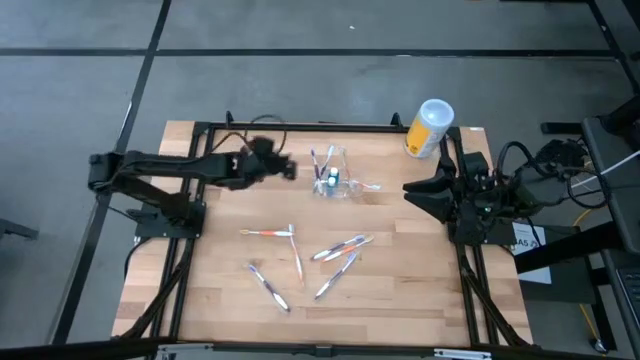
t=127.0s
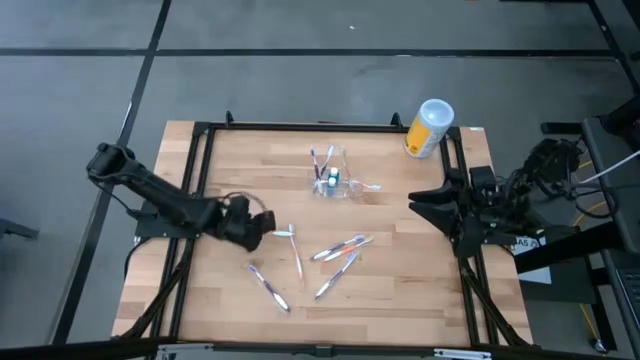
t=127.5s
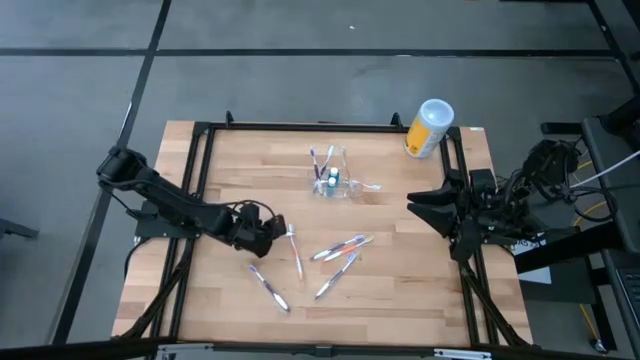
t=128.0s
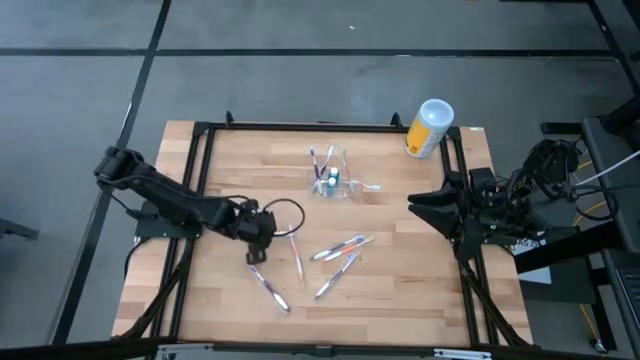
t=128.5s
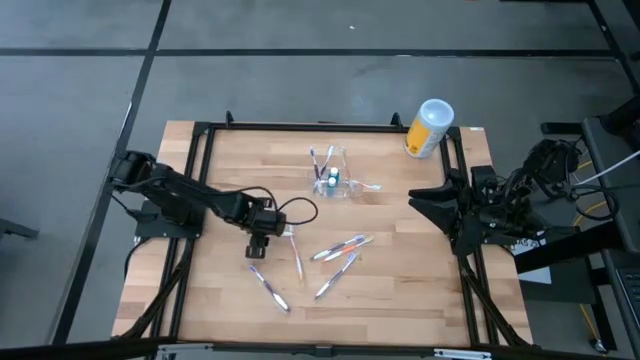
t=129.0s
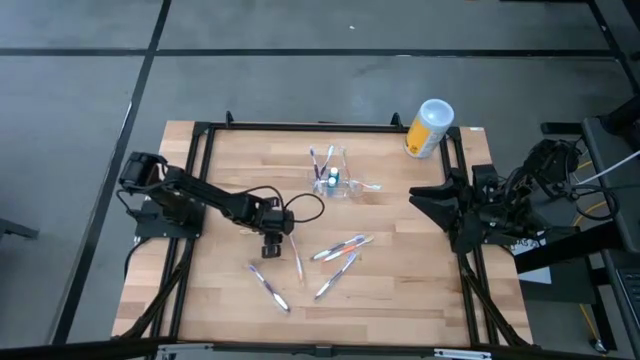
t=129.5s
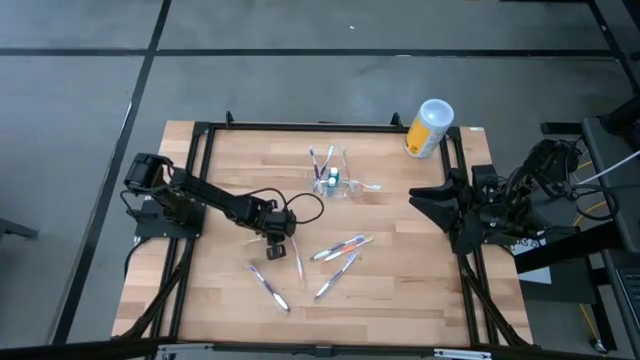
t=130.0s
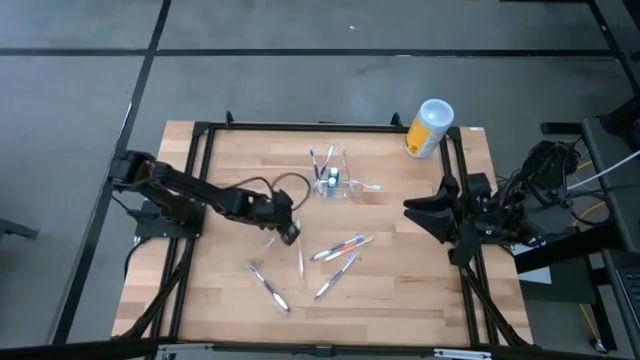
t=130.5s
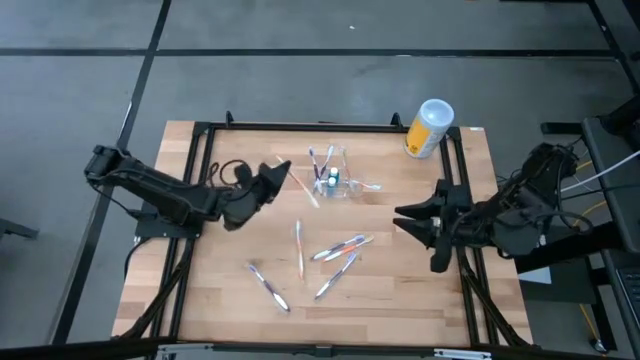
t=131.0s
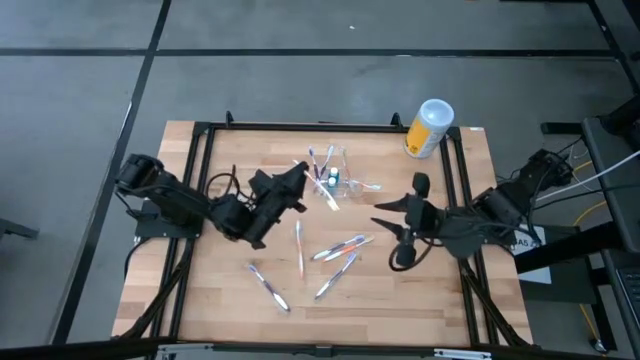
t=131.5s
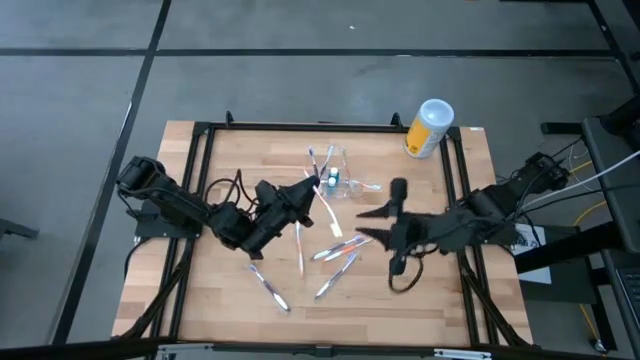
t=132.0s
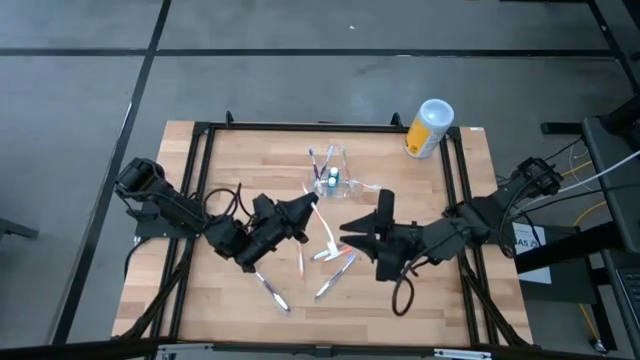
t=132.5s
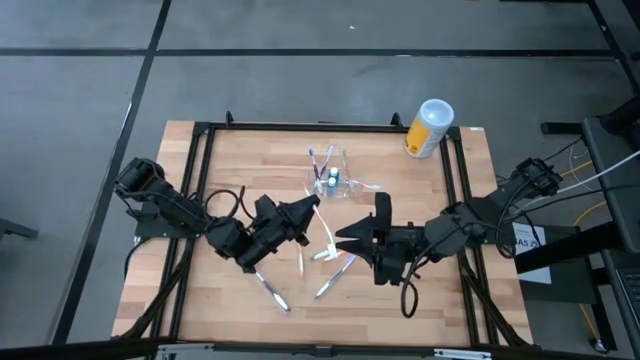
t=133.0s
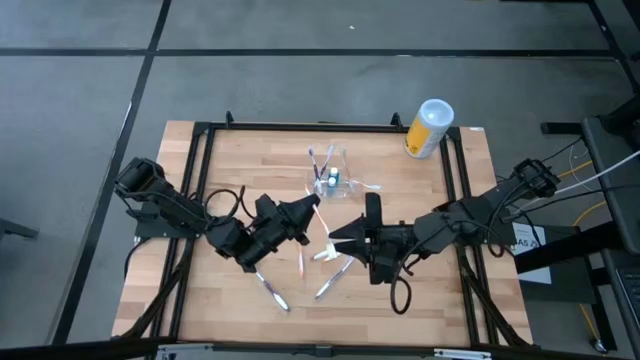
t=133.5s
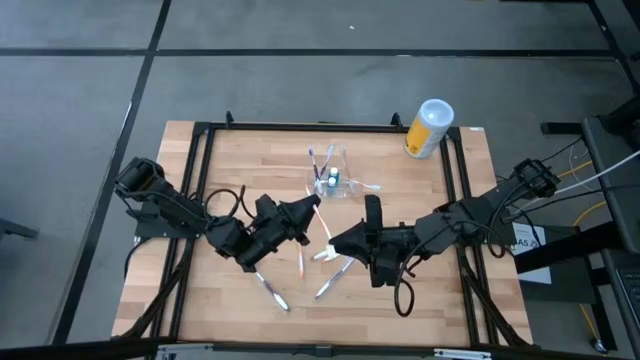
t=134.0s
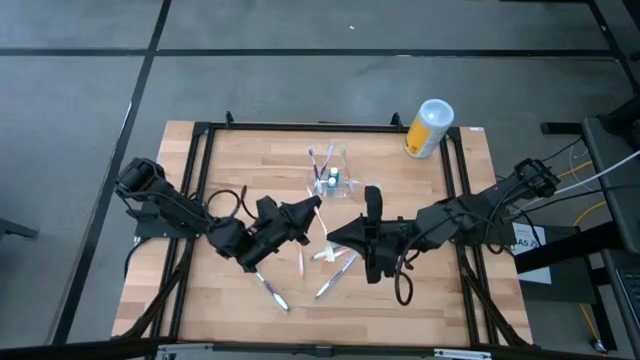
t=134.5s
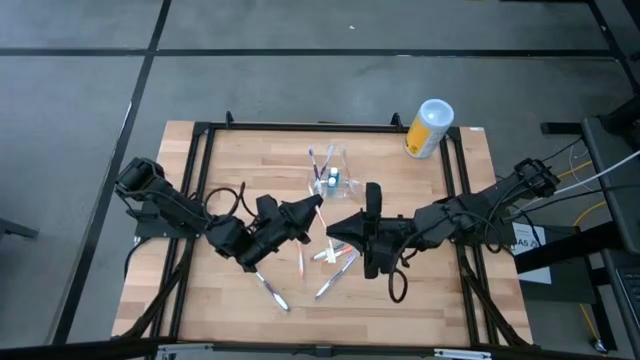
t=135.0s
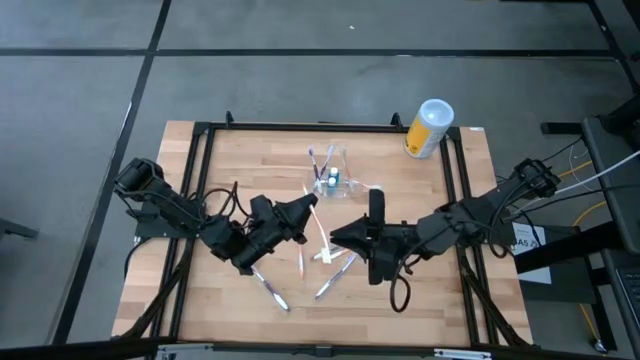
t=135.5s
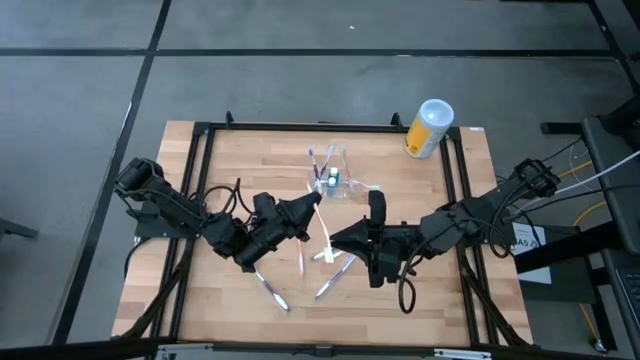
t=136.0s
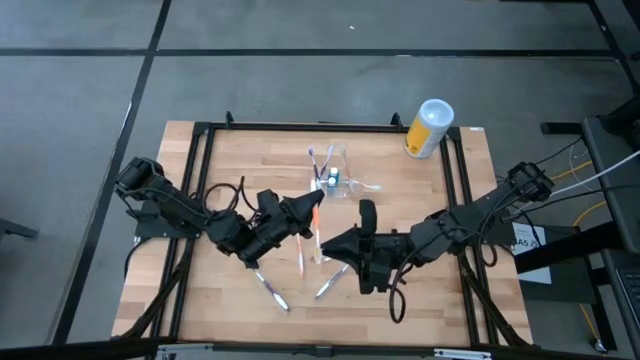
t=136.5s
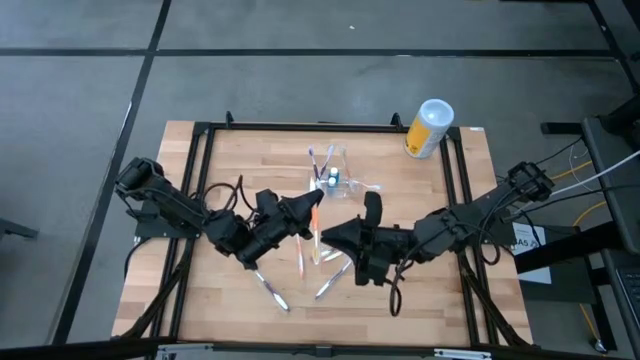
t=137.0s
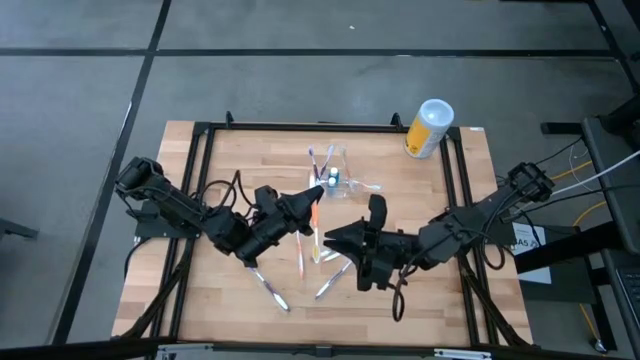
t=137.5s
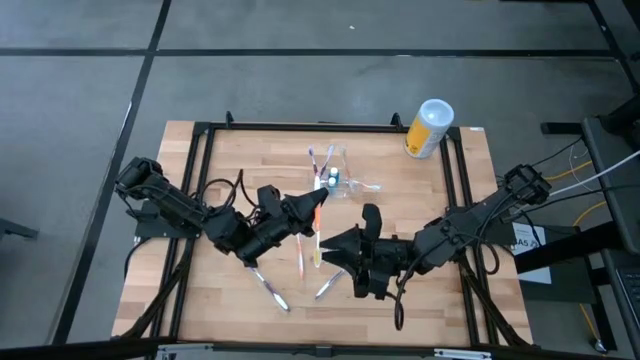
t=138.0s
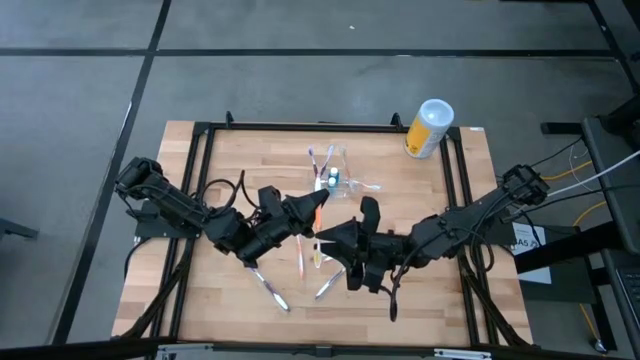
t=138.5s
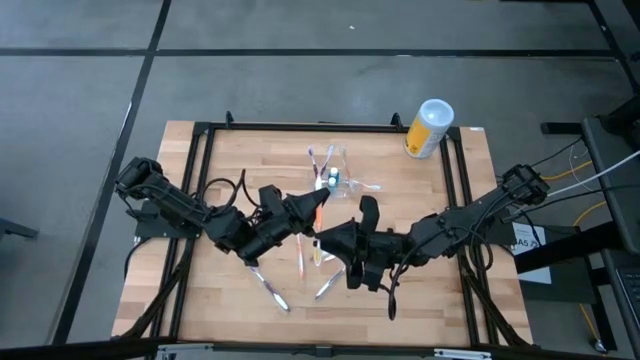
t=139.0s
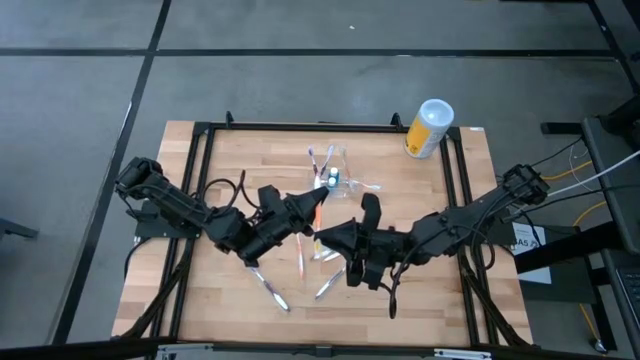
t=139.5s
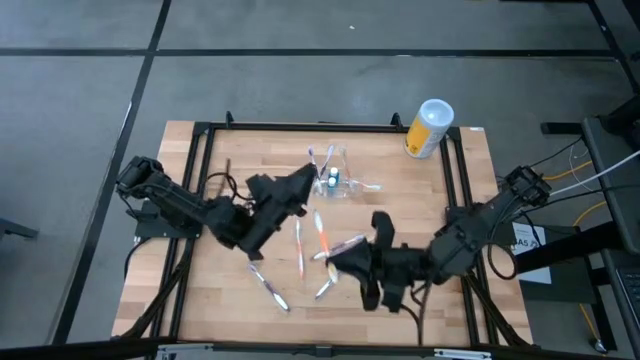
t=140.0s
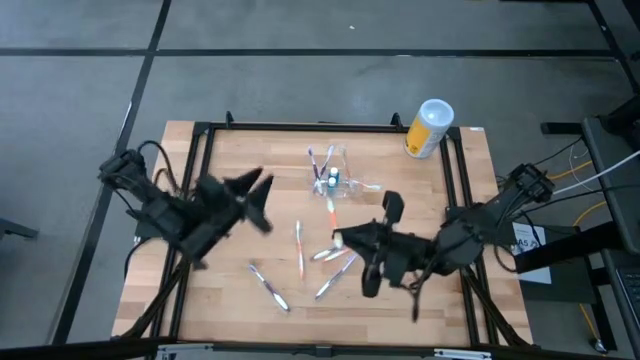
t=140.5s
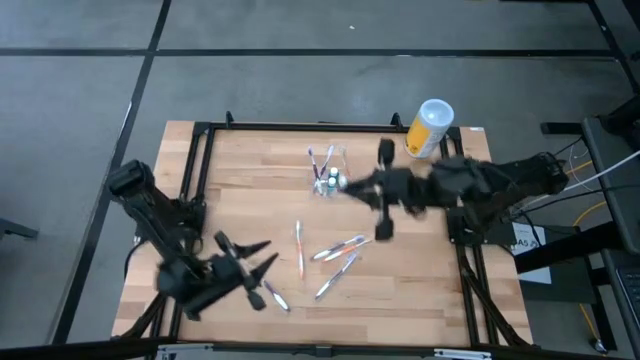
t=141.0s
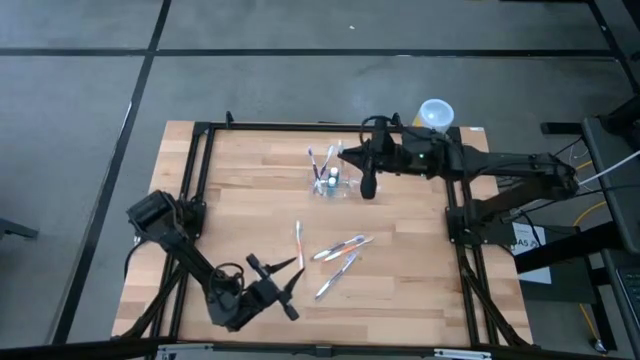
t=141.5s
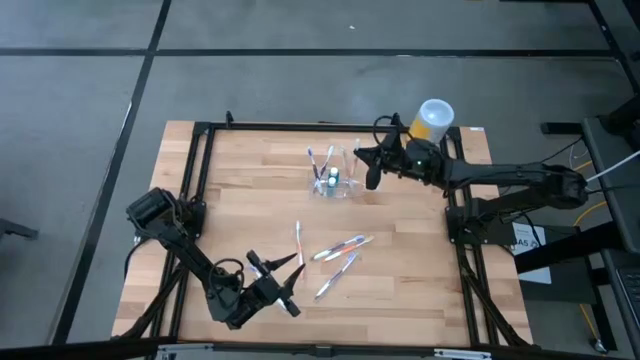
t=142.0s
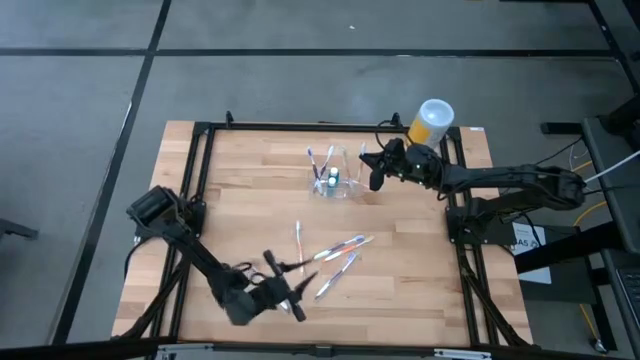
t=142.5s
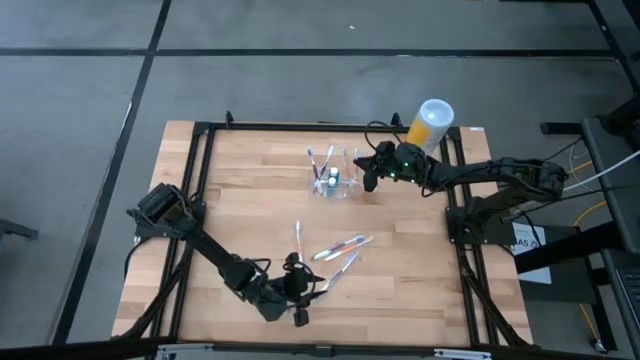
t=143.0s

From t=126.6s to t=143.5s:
Task: Pick & Place toothbrushing station
Put the orange toothbrush into the right section of the transparent organizer

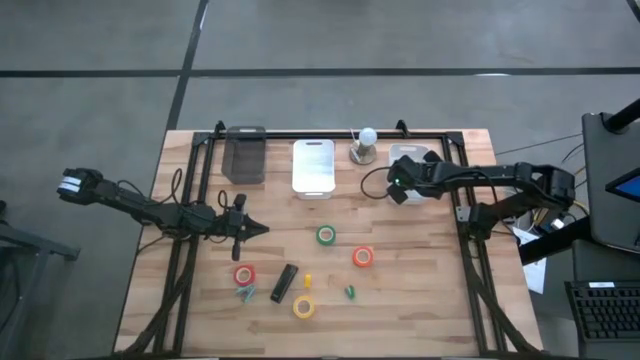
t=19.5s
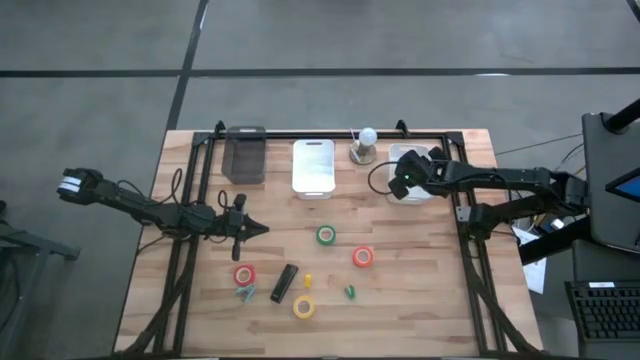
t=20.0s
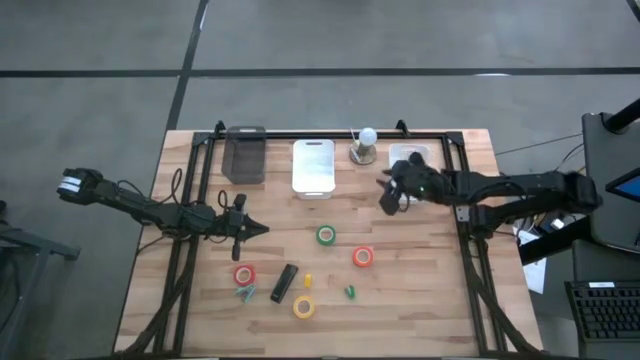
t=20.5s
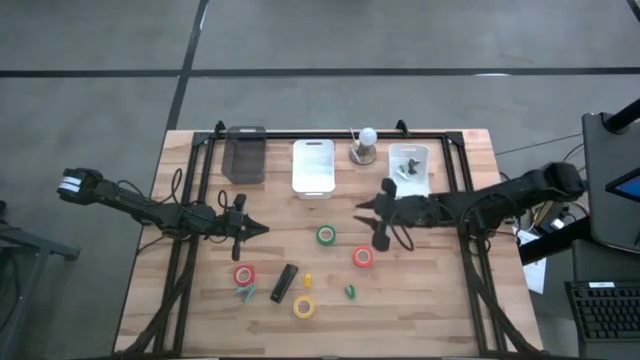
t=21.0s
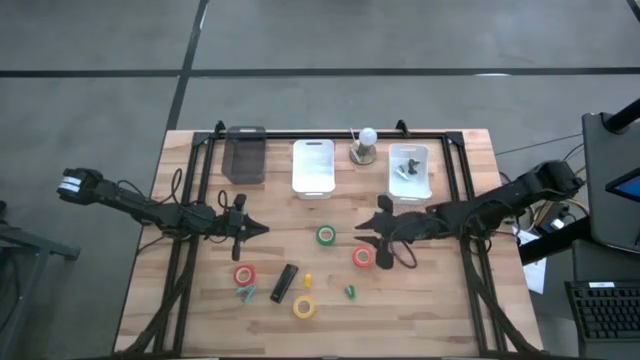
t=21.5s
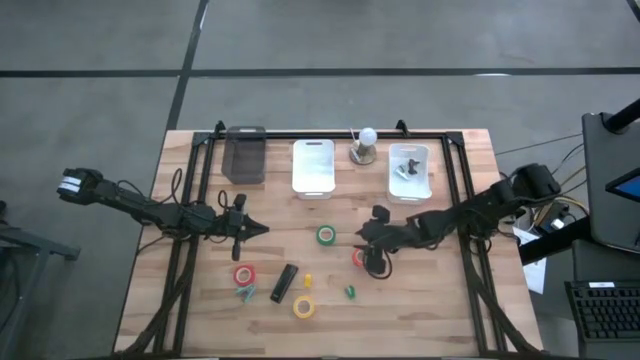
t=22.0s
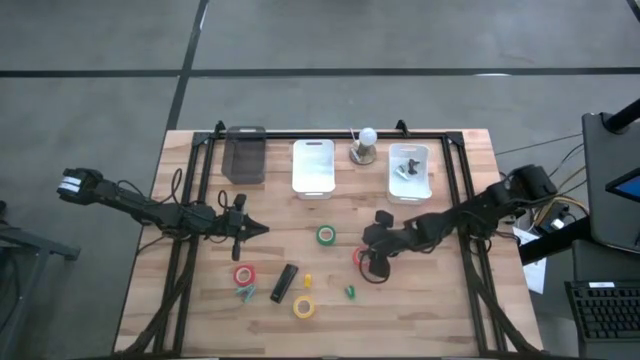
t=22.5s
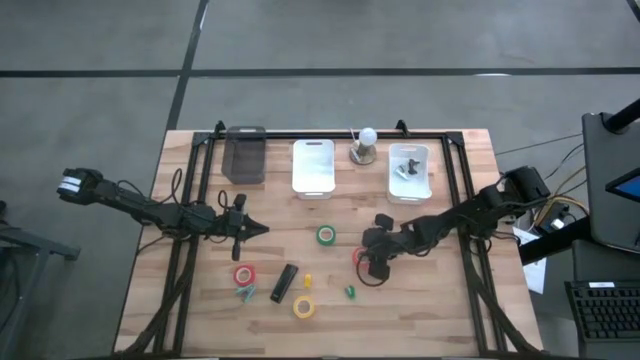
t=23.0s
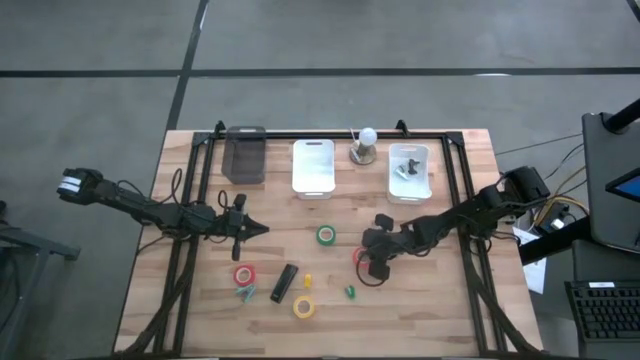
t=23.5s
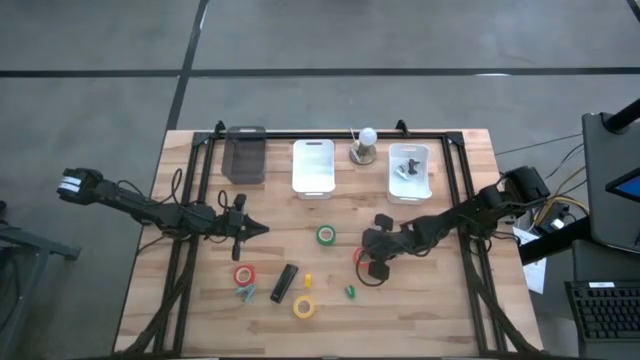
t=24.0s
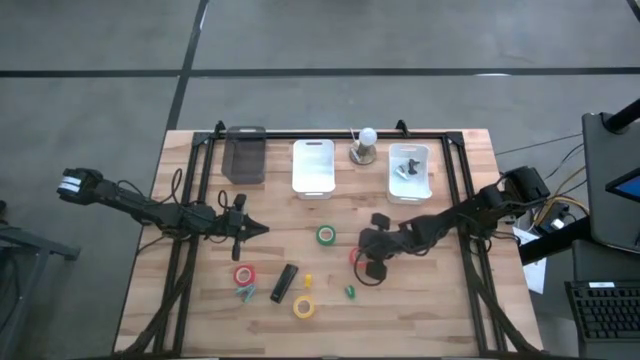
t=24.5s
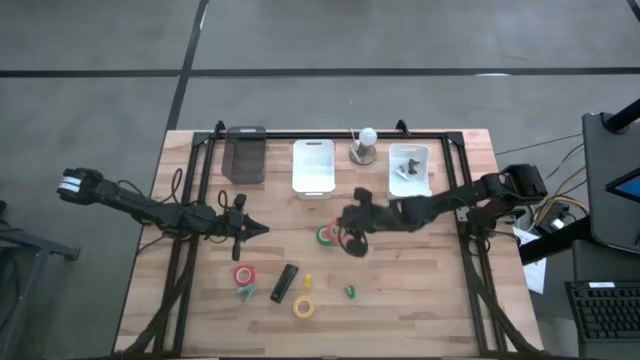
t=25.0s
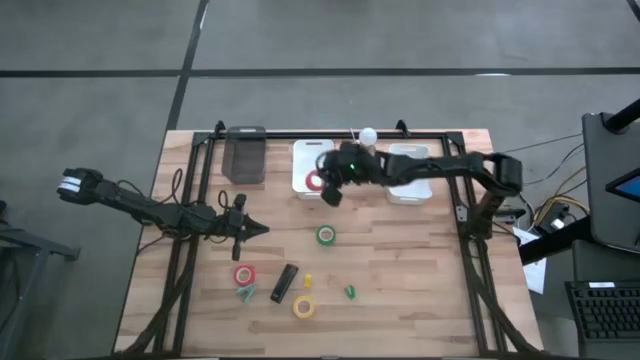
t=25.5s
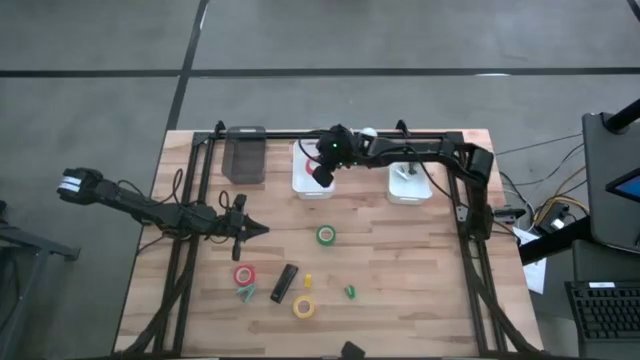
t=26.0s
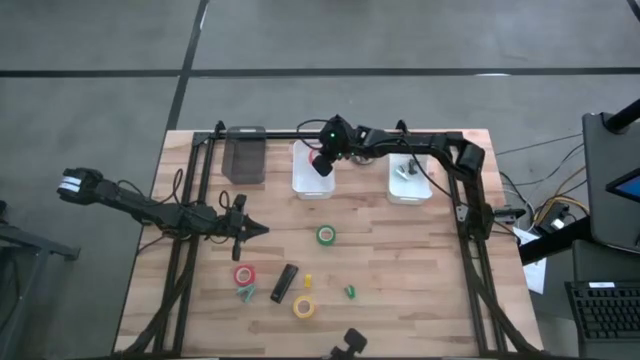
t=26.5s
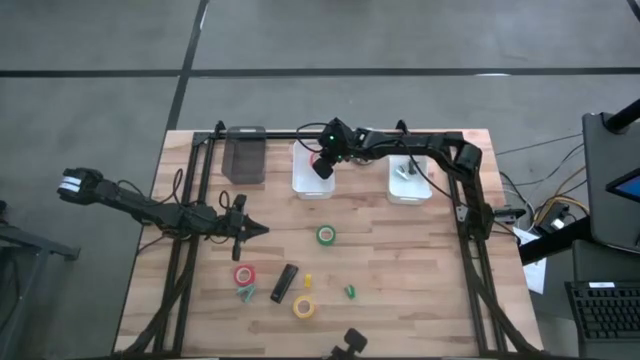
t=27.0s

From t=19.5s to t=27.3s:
Task: Pick and place Stapler, Stapler remover, tape
Put the top orange tape into the left white bin
